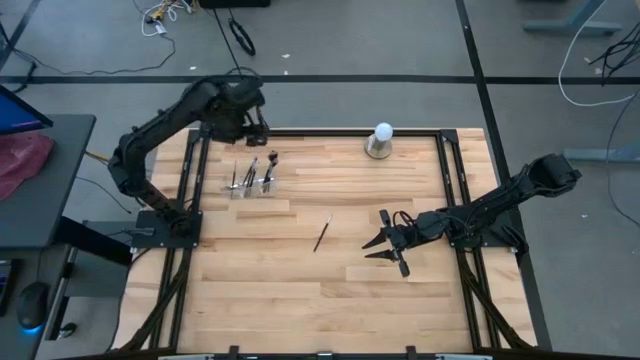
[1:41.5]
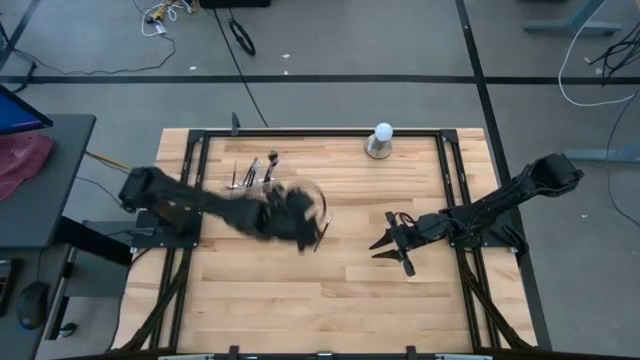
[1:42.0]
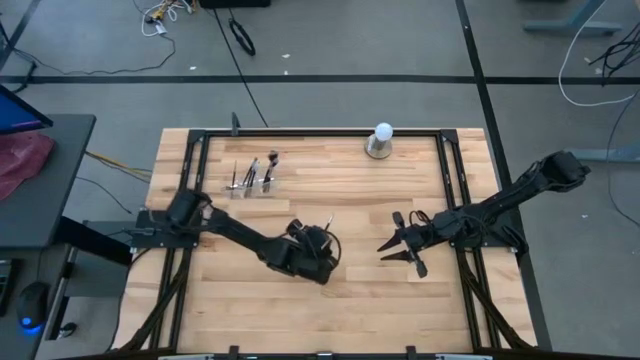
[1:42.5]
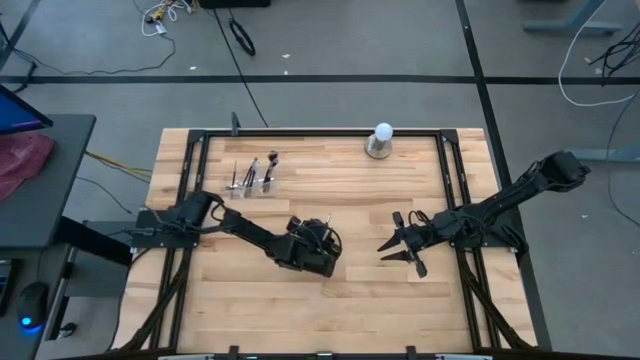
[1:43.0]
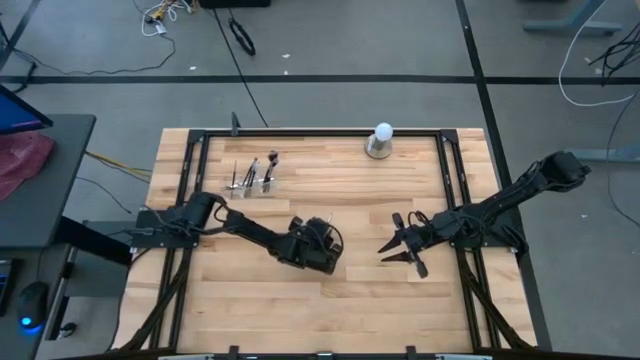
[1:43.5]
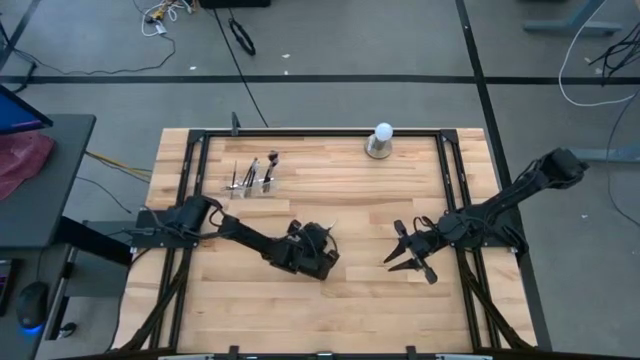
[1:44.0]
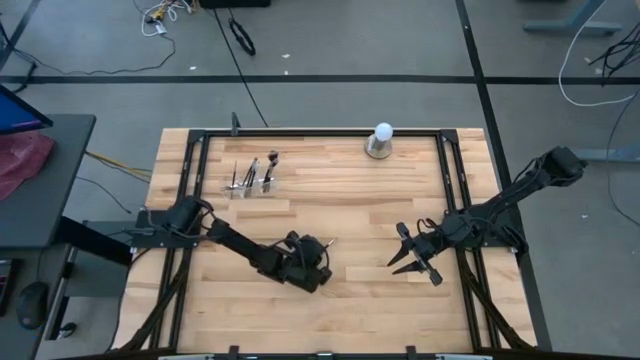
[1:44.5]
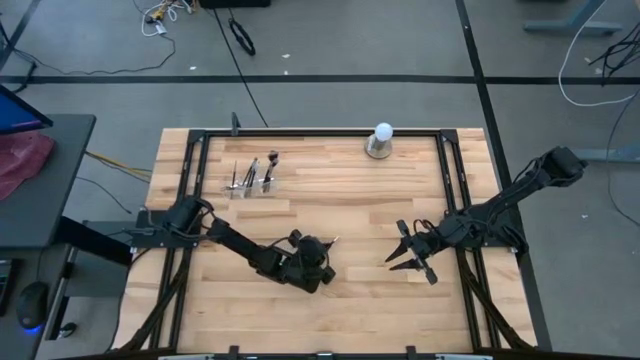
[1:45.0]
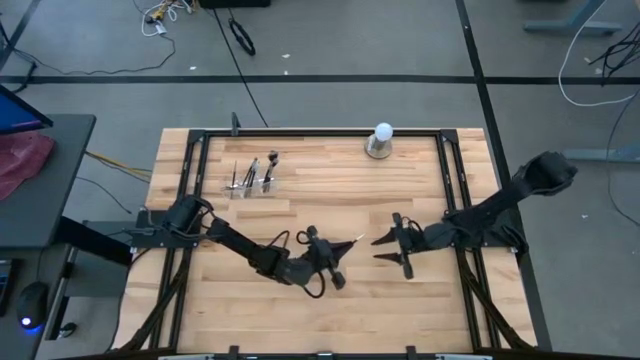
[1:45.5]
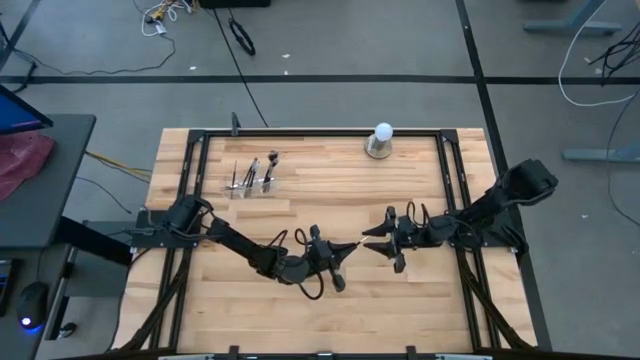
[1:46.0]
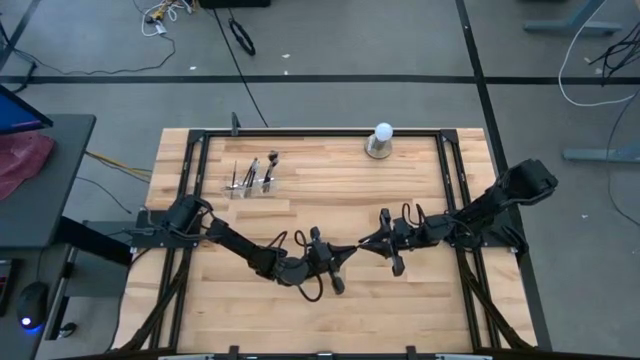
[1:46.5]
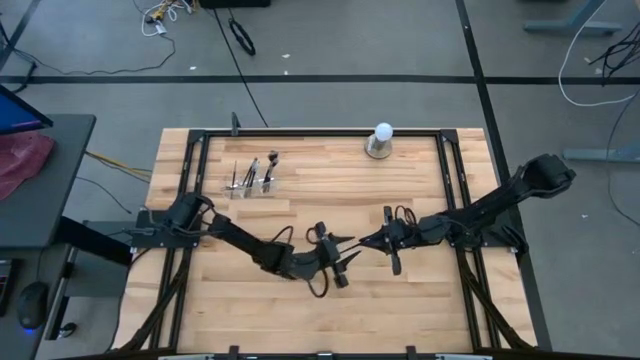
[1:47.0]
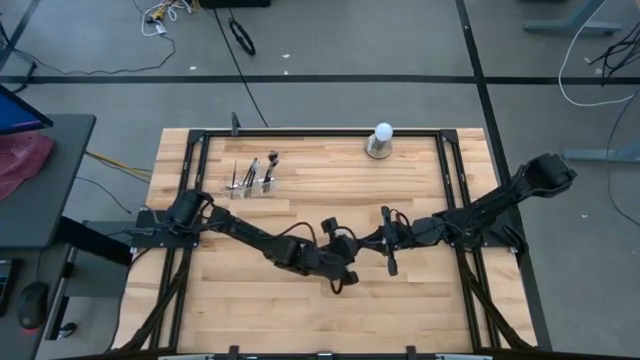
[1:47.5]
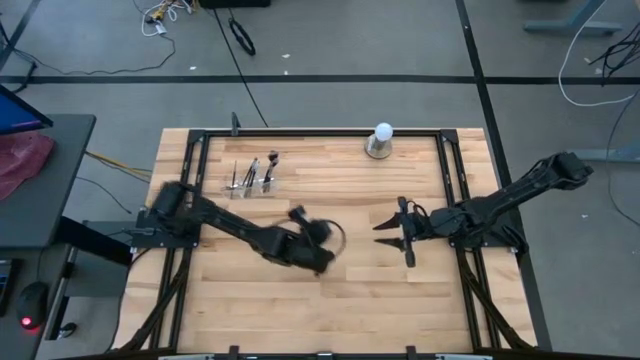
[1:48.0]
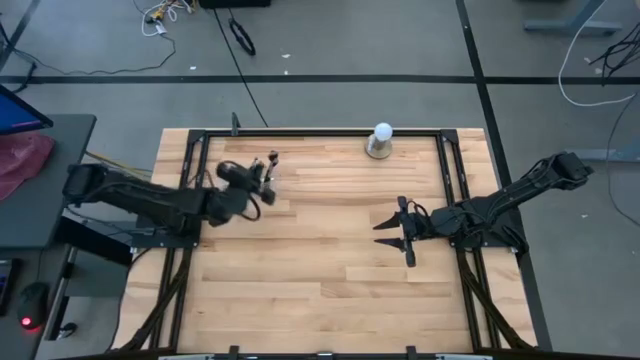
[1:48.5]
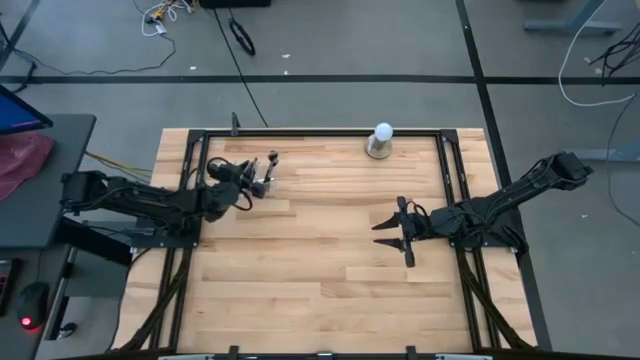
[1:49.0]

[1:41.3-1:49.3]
Task: Put items in baskets/containers
Put the black liner brush into the middle section of the transparent organizer

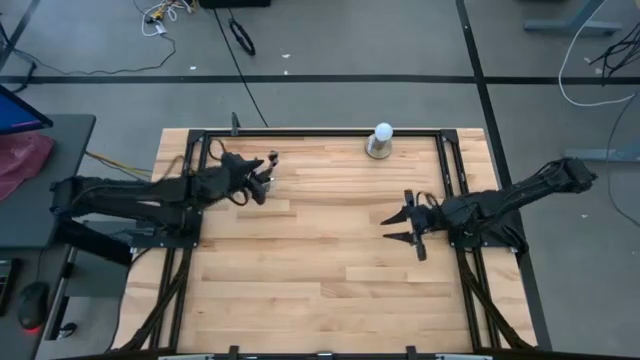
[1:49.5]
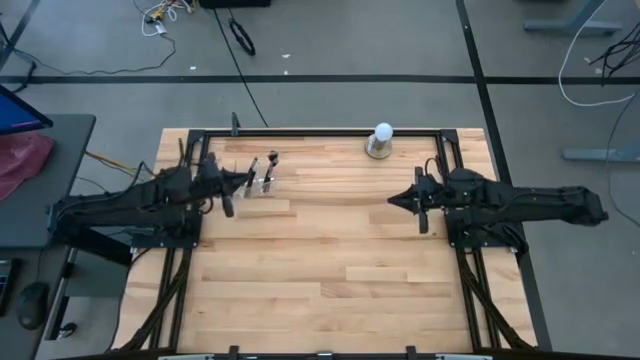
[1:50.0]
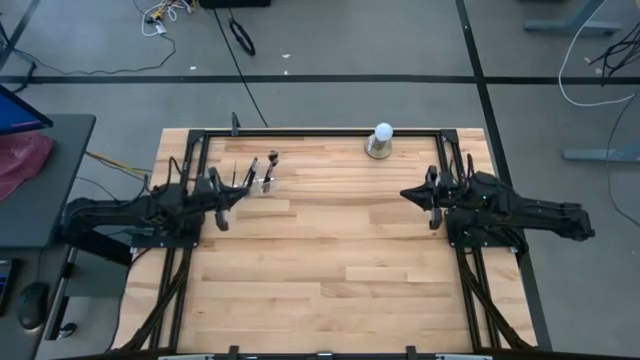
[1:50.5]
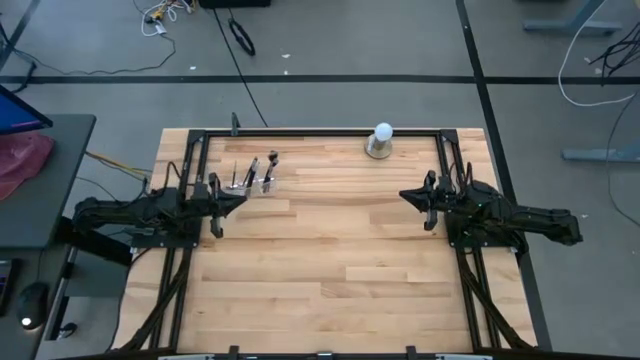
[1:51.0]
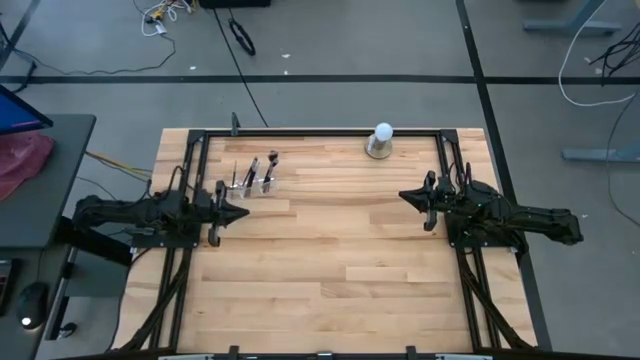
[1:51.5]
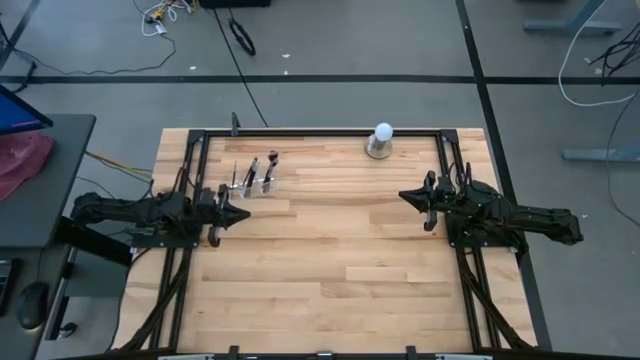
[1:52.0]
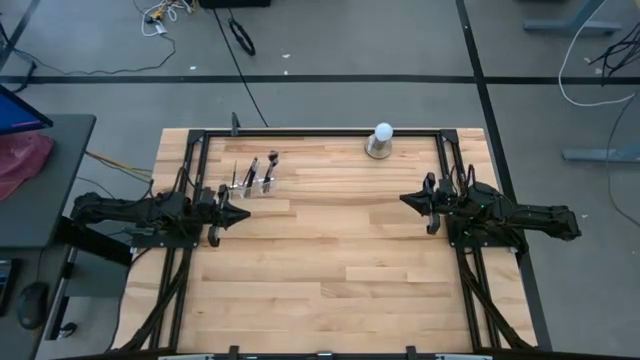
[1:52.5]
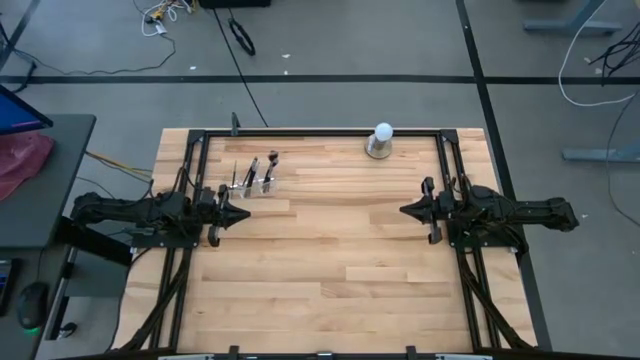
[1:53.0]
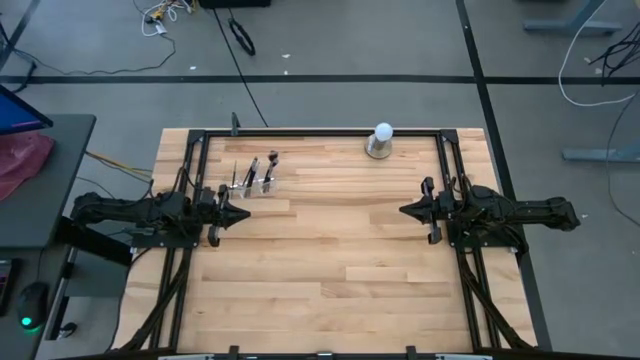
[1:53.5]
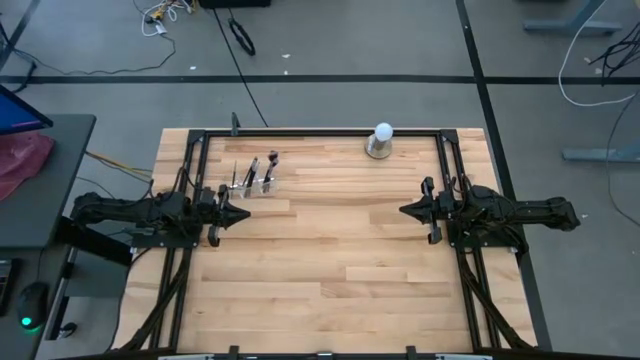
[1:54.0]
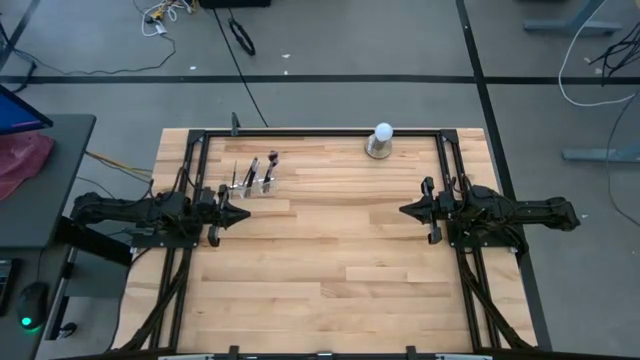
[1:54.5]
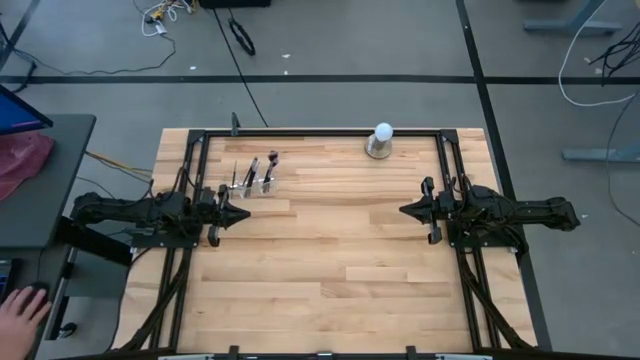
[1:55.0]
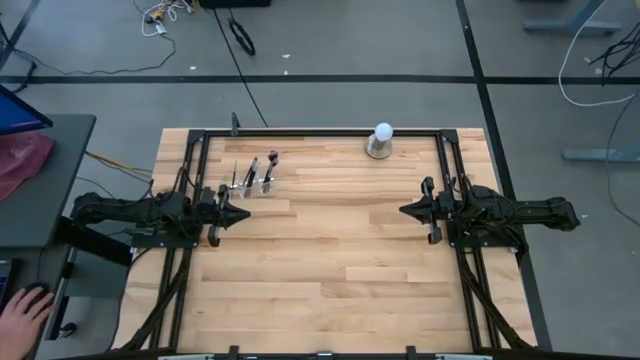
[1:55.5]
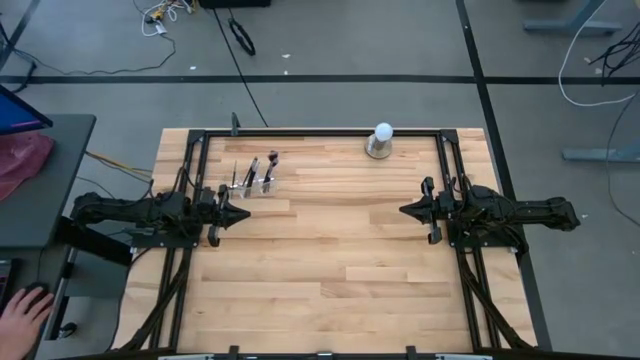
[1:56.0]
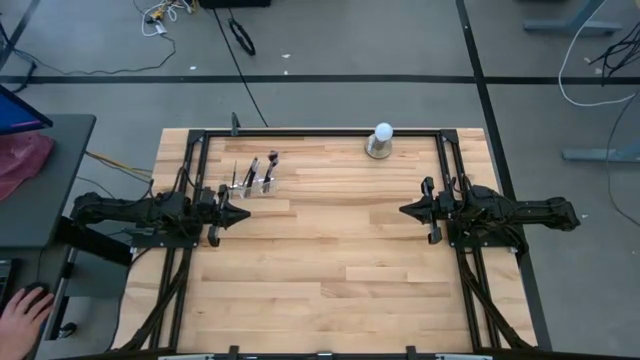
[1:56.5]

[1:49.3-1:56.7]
Return to Home Position

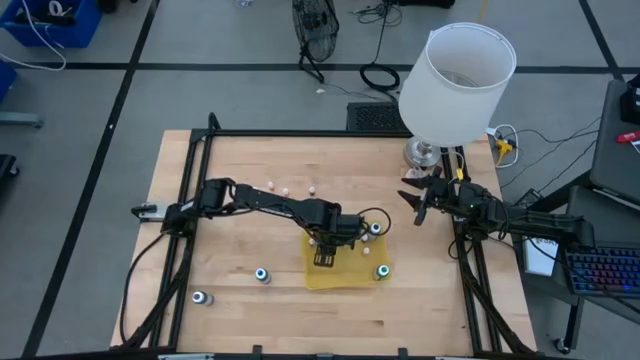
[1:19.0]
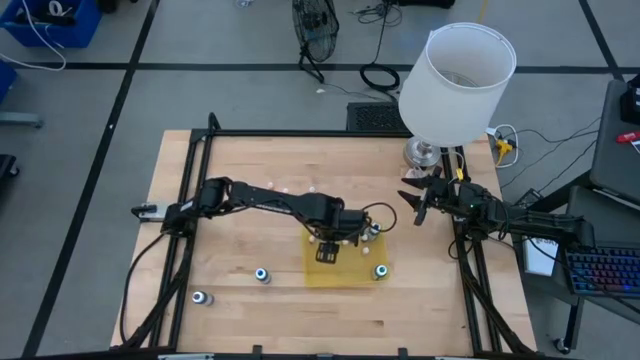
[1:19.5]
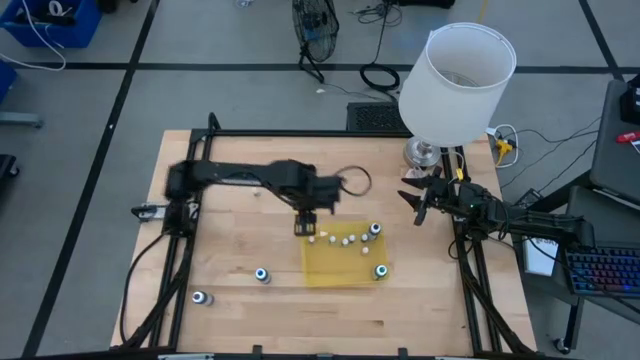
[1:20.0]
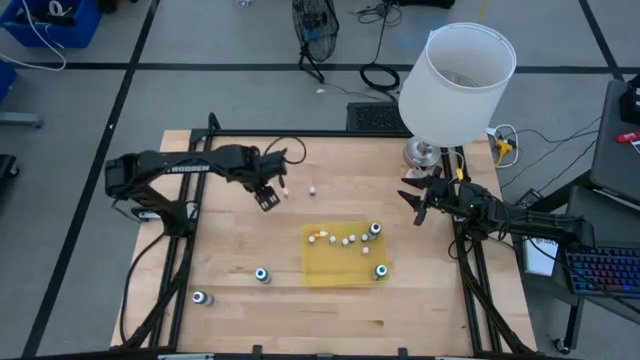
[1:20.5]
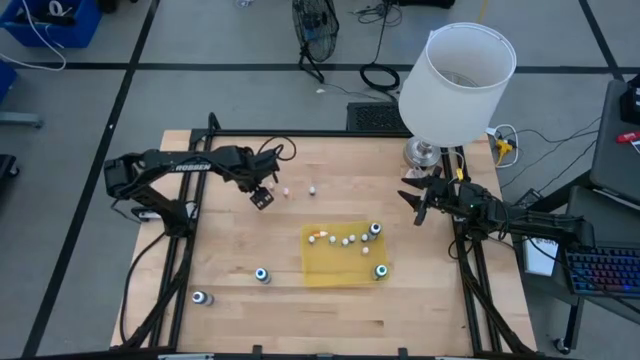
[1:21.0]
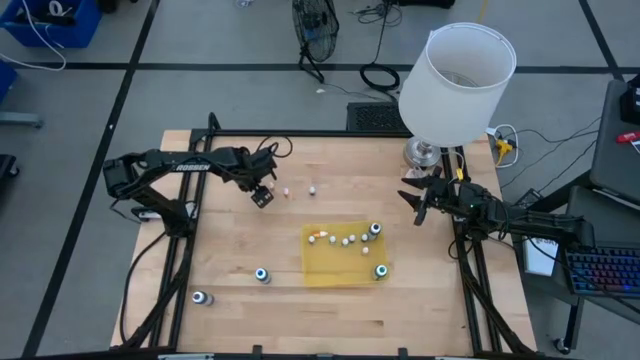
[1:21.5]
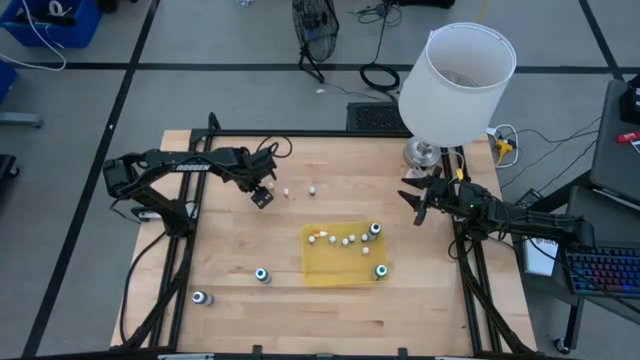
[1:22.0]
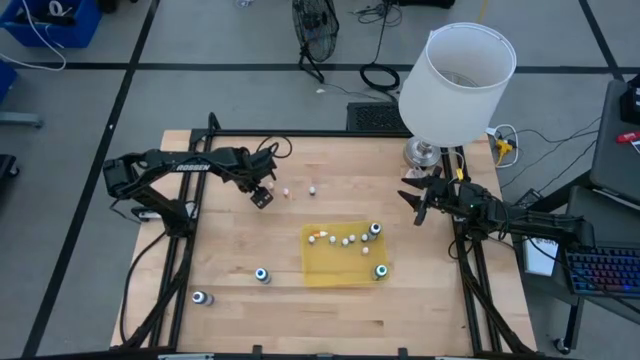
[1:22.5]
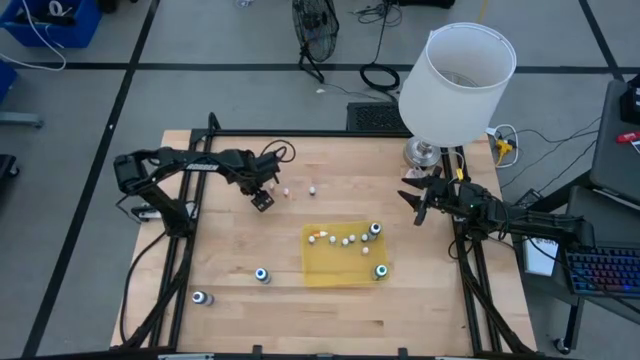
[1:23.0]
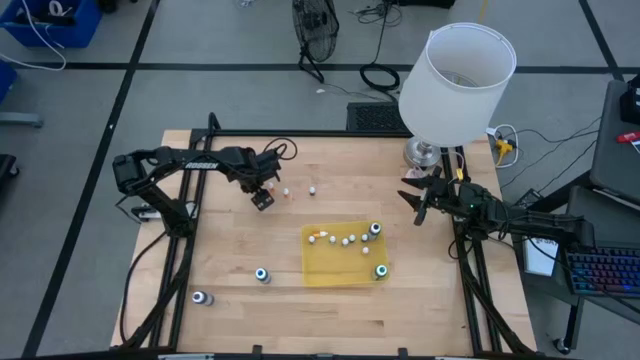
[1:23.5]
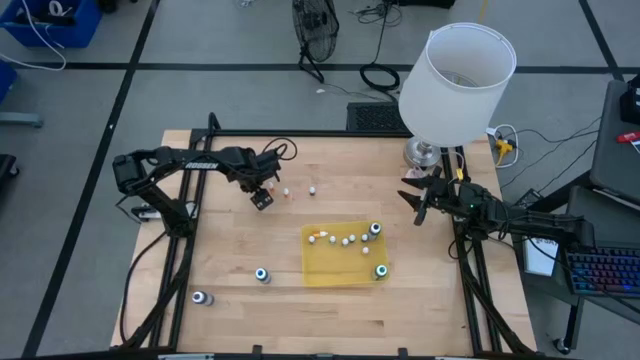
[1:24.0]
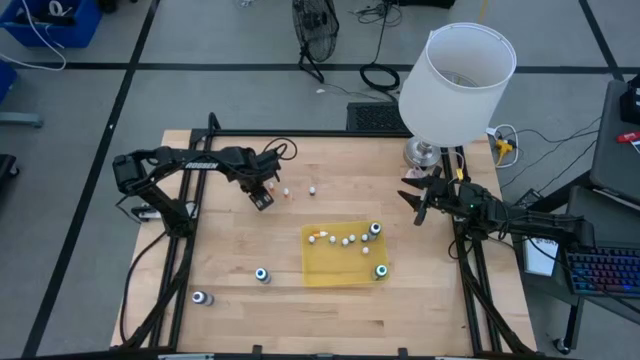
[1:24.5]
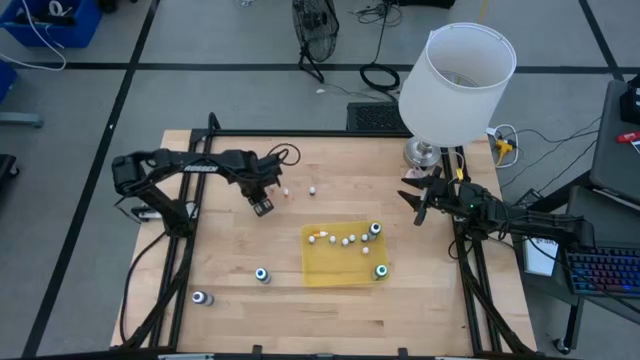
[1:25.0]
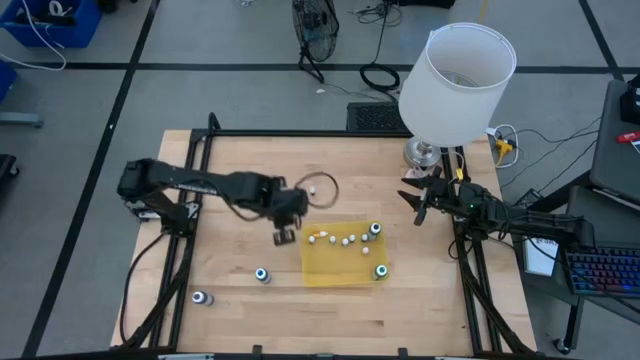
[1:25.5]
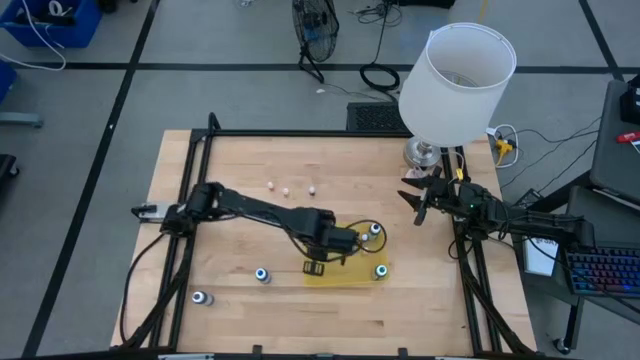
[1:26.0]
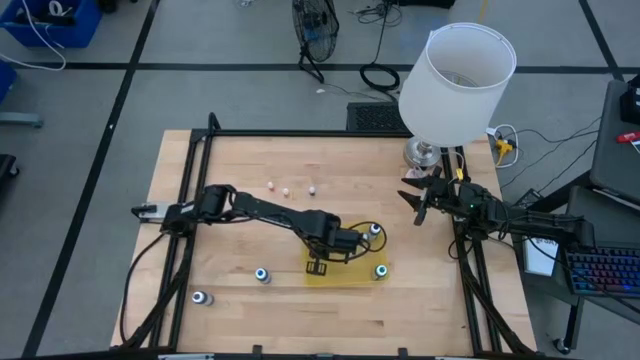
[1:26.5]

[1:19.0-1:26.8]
Task: Pick & Place food coloring
Put the small black food coloring bottle into the yellow bin
